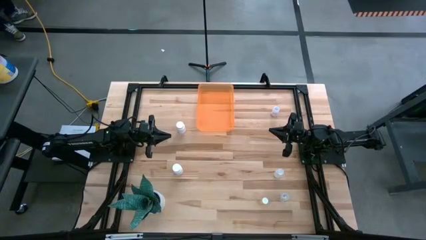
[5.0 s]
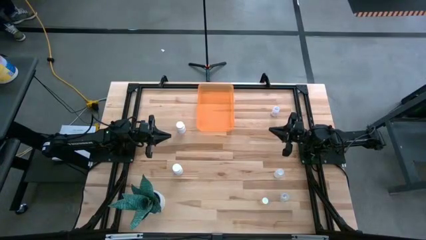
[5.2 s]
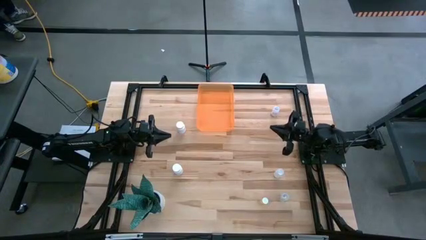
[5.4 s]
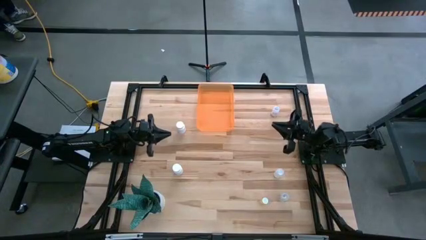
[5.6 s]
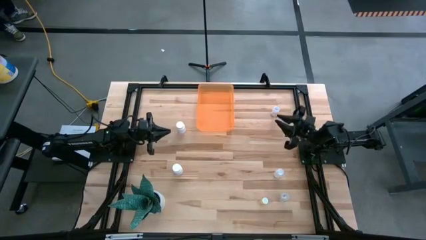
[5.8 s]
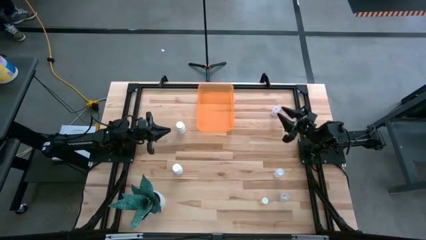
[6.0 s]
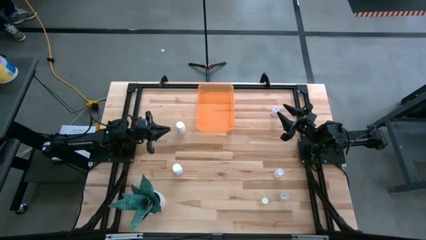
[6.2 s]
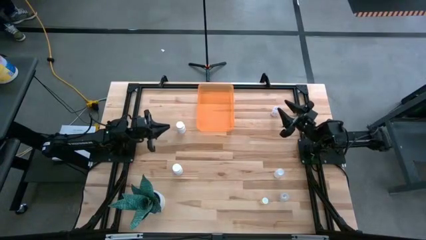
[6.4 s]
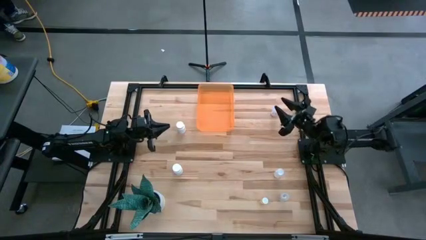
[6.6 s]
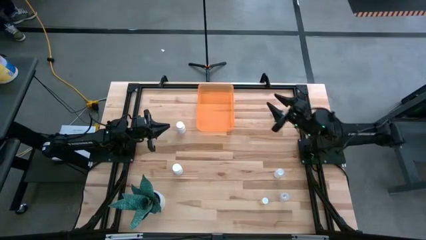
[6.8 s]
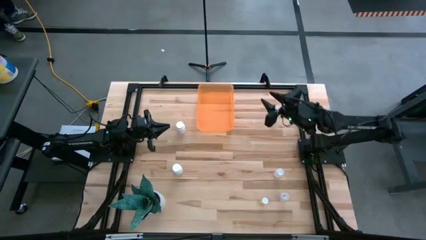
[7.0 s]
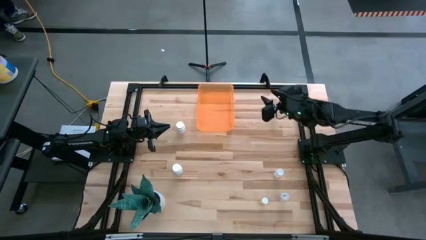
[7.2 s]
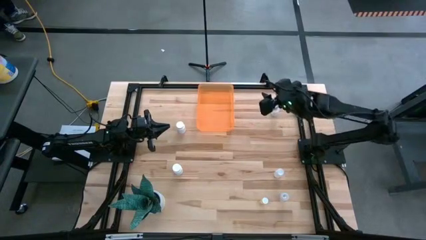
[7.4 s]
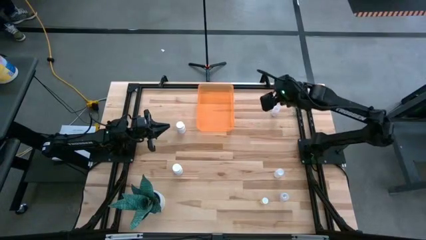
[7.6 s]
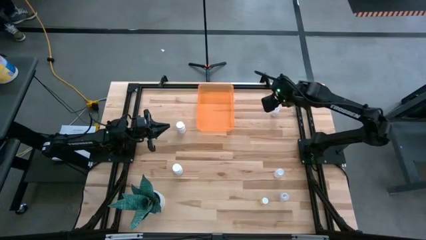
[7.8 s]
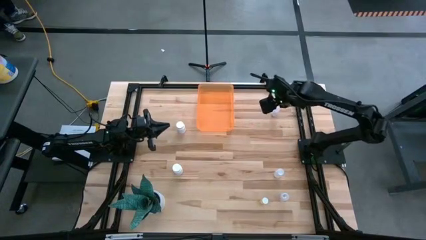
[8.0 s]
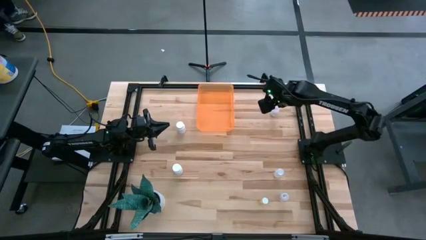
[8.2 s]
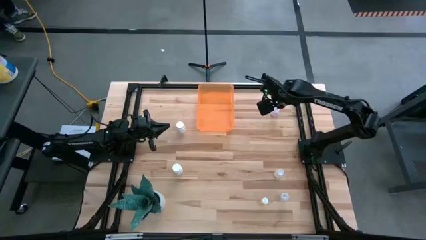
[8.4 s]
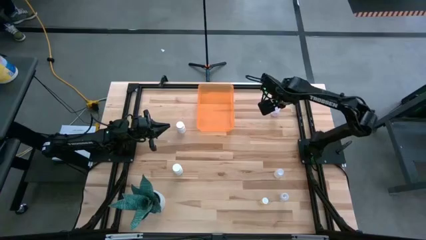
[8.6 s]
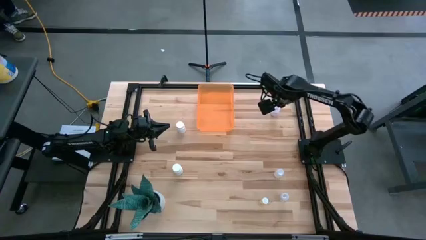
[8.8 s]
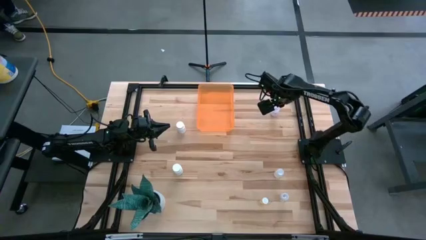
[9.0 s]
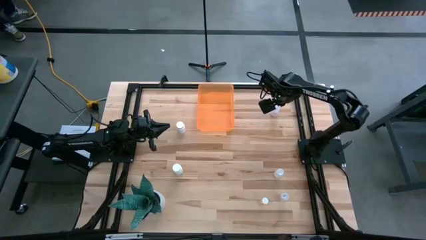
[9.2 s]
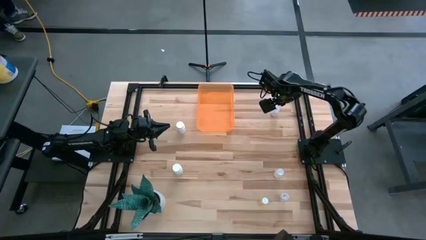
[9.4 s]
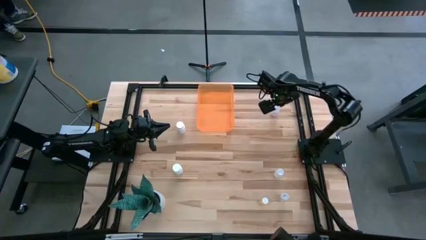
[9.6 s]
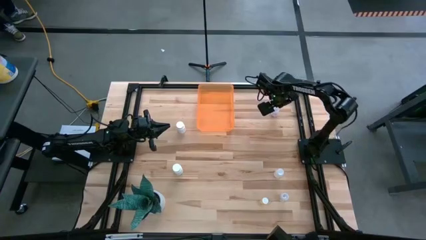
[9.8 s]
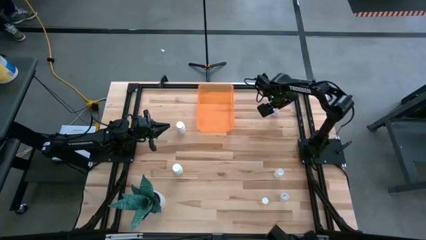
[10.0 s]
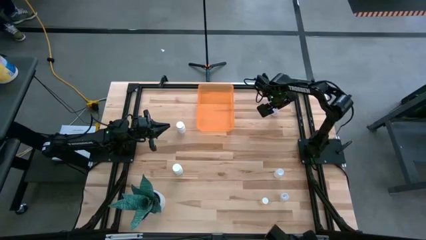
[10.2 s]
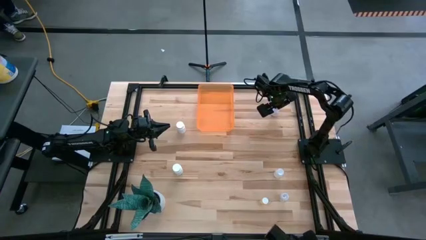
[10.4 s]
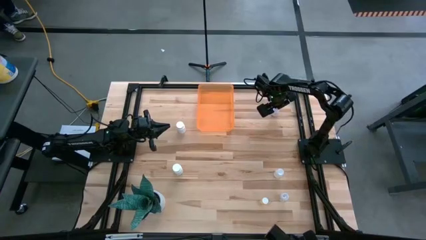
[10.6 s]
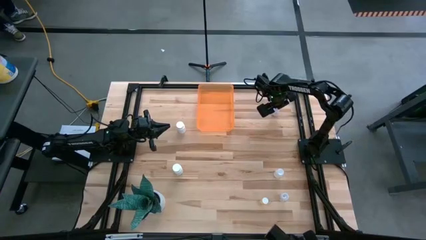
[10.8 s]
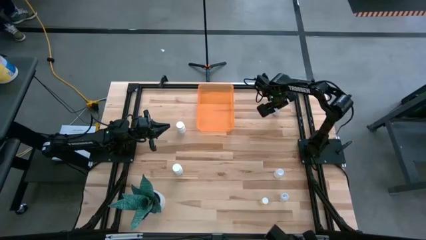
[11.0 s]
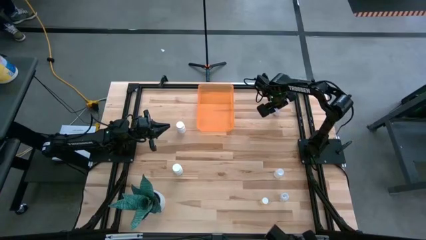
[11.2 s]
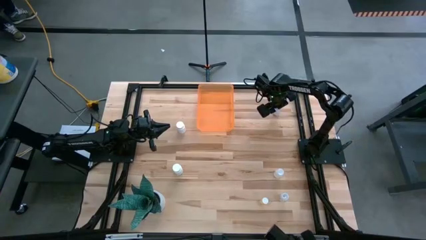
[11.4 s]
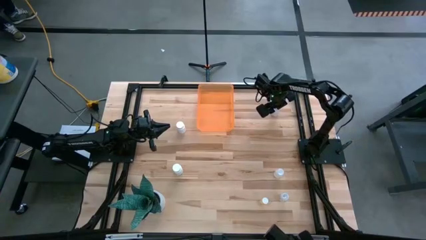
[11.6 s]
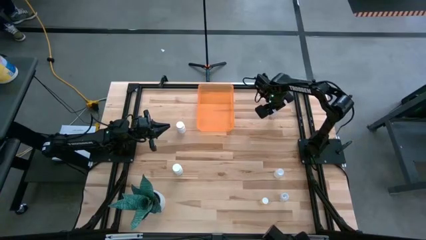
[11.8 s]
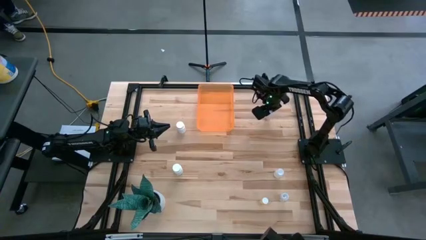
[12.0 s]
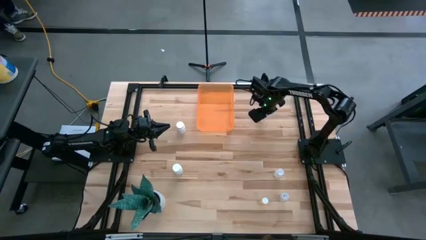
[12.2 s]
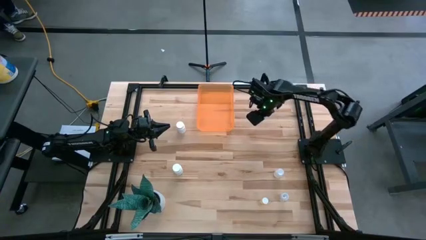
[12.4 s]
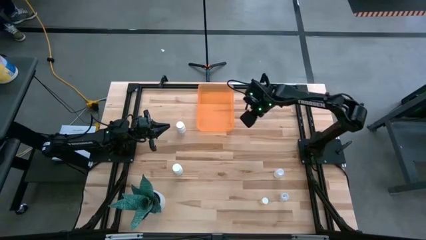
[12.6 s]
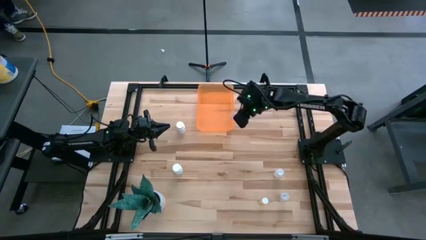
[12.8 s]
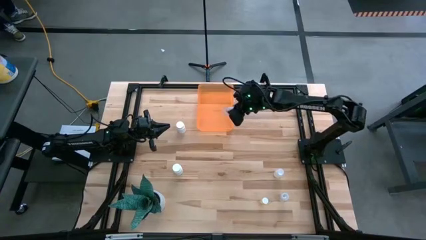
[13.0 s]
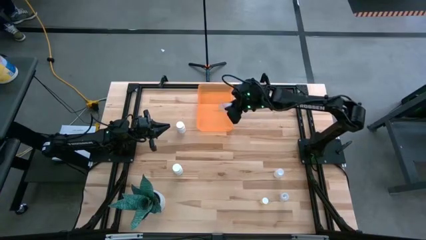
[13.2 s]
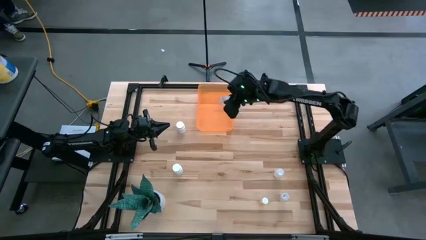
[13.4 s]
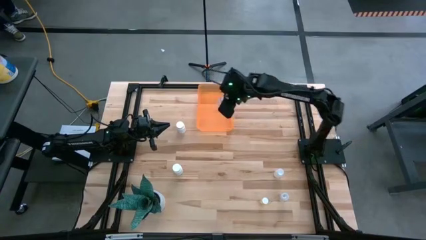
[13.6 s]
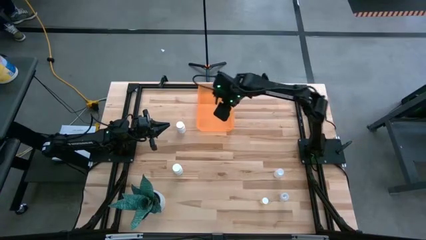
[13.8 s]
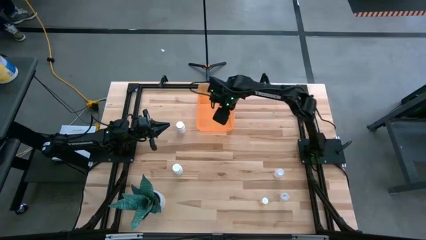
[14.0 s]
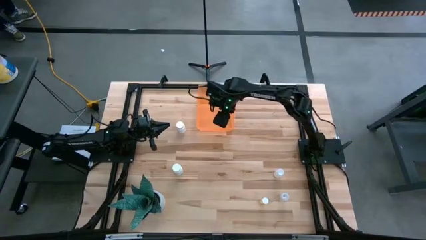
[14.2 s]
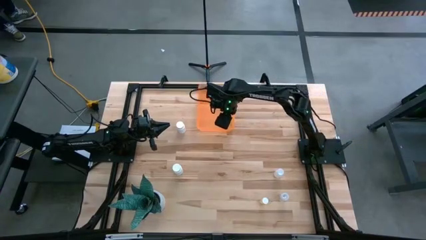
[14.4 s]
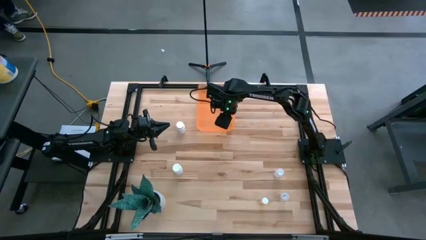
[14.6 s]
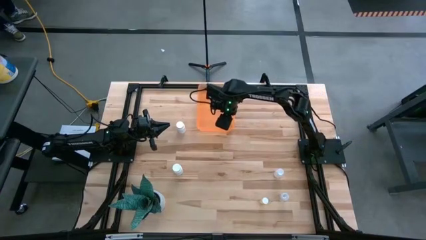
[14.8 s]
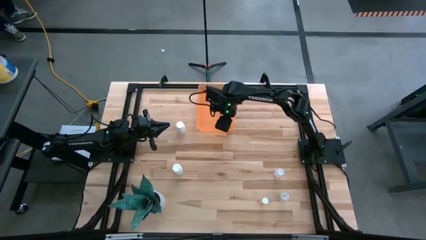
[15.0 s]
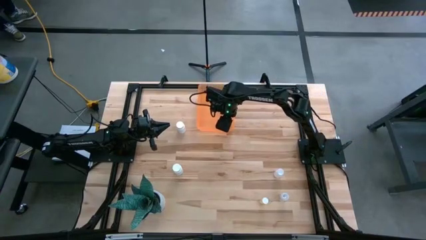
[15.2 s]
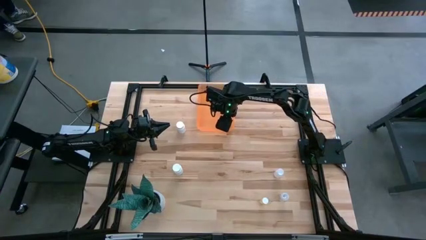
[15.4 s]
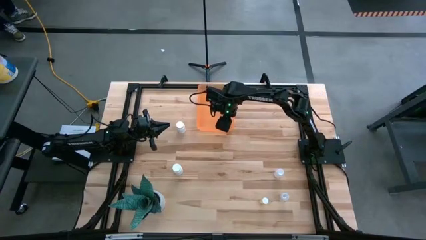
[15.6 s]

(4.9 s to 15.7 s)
Task: Pick and place pill bottles into a basket
Put the top transparent pill bottle into the orange bin

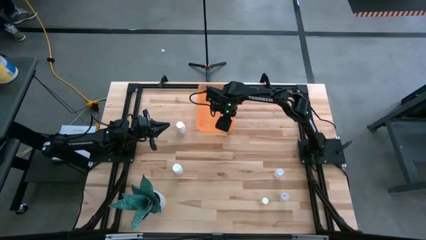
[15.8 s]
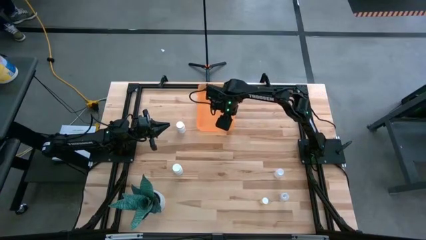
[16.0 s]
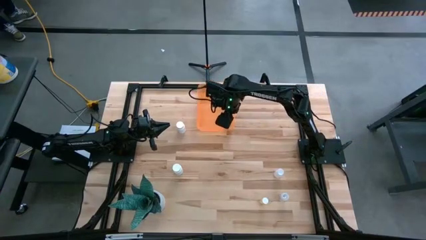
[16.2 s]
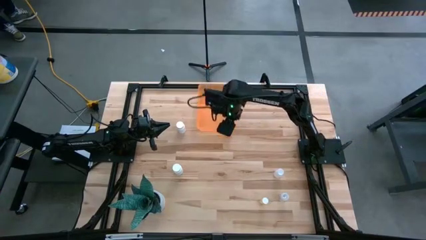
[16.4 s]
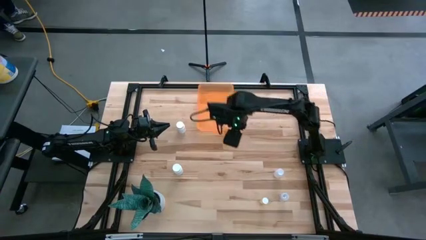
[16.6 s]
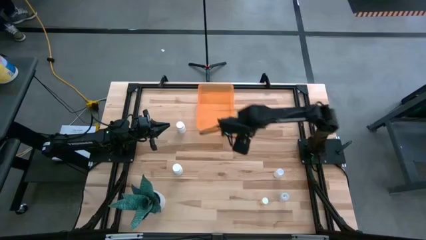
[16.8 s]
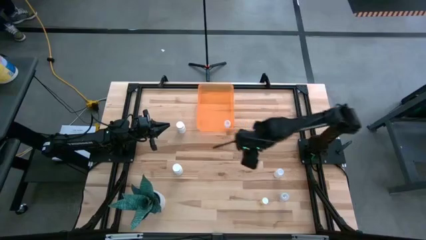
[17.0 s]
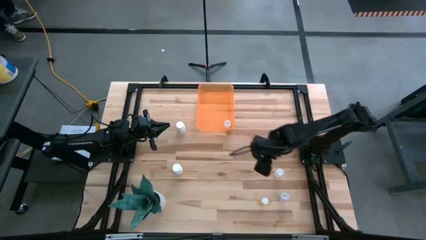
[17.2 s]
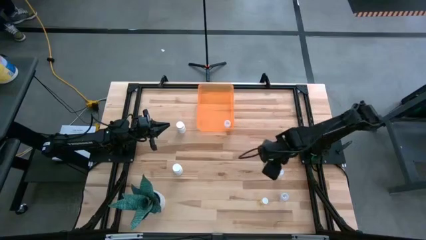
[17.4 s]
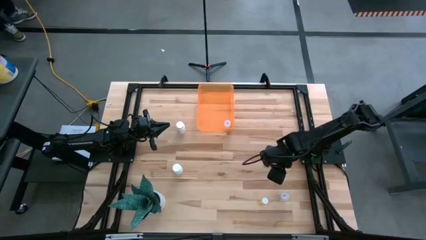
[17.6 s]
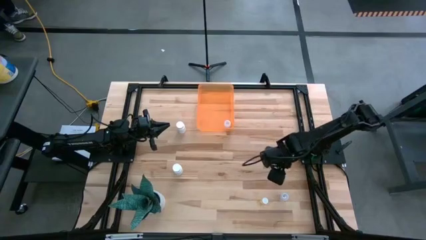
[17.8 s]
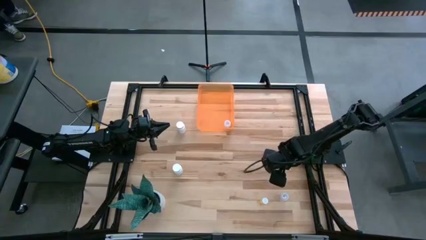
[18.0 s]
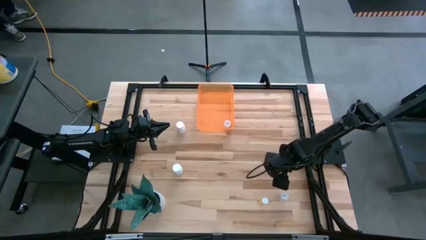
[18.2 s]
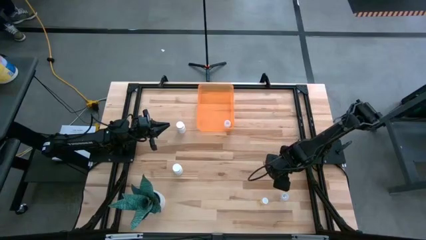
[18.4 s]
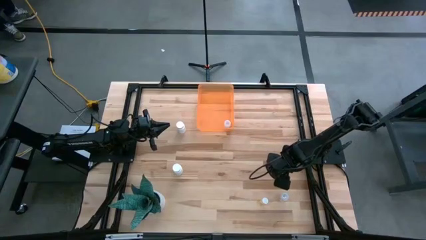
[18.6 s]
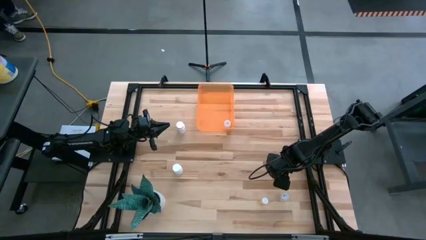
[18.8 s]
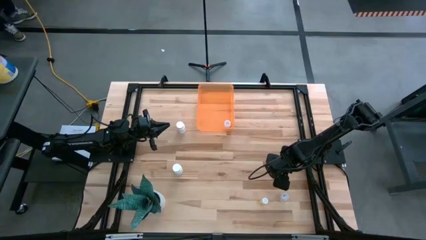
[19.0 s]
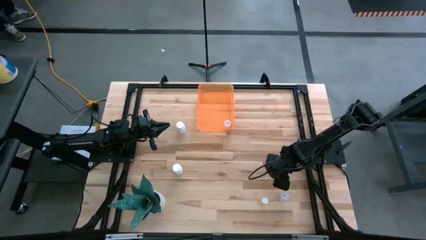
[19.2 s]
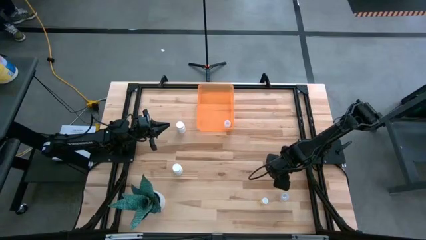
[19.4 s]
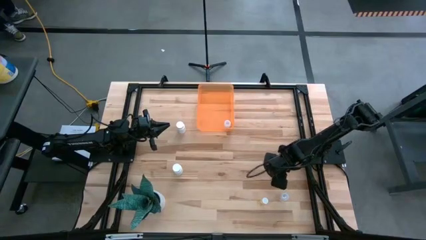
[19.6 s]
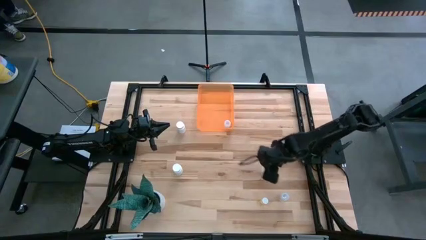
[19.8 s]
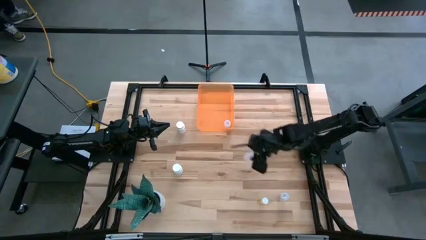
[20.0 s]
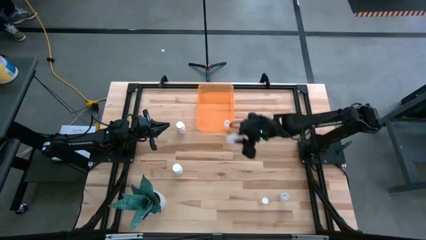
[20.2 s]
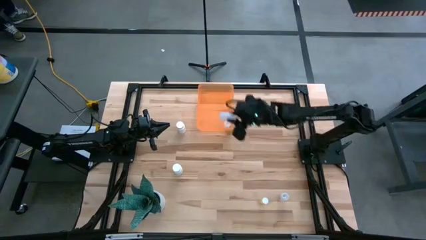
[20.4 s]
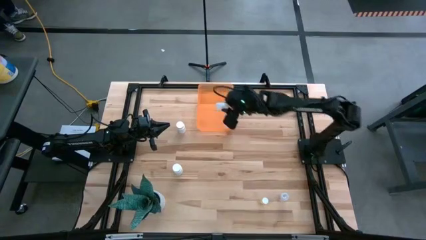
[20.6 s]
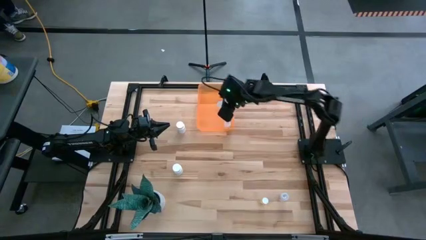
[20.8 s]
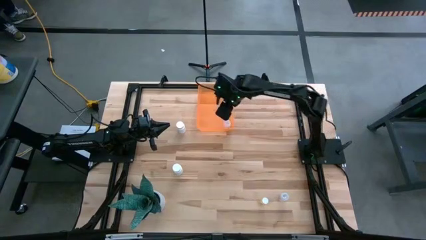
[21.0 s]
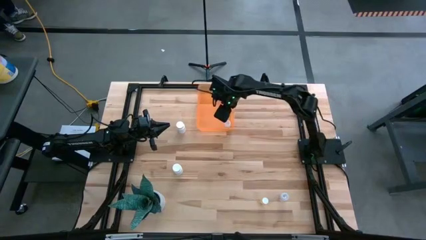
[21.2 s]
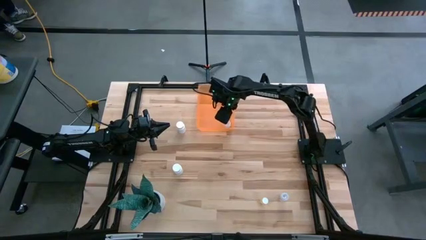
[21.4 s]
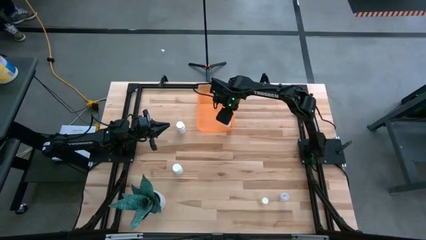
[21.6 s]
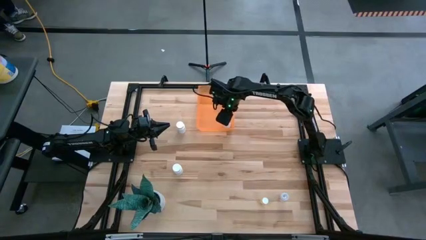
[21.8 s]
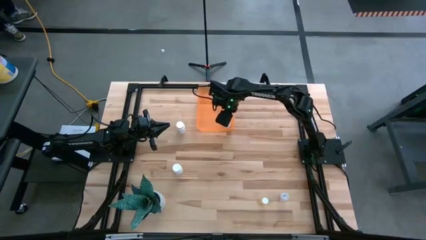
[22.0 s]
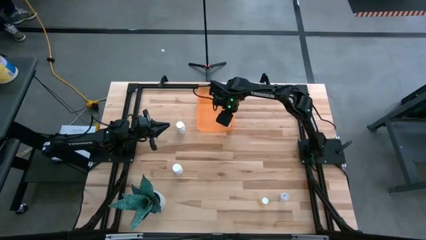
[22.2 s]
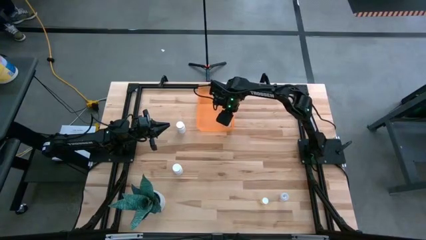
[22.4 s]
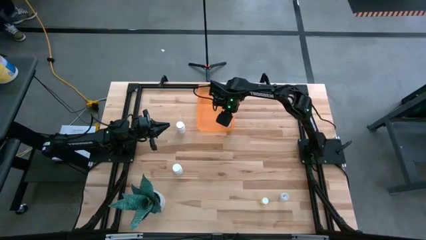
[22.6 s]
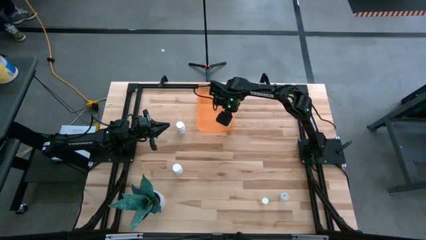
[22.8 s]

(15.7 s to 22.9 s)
Put the top transparent pill bottle into the orange bin
